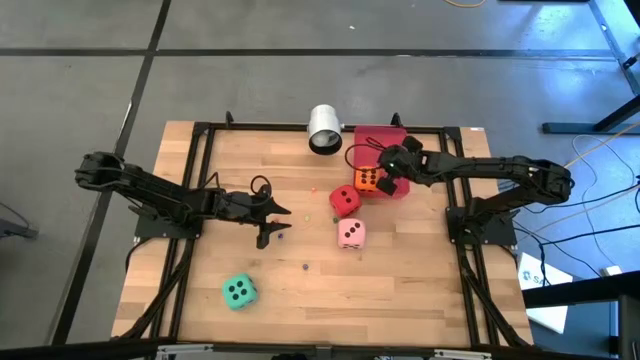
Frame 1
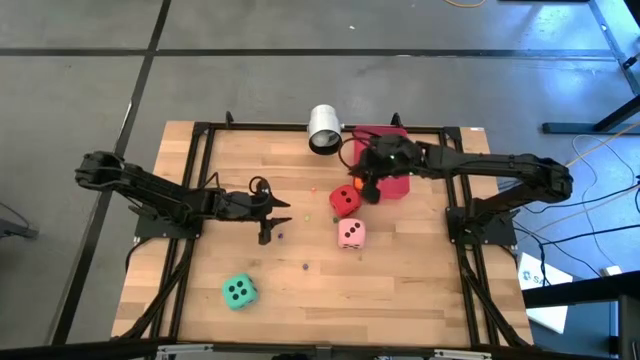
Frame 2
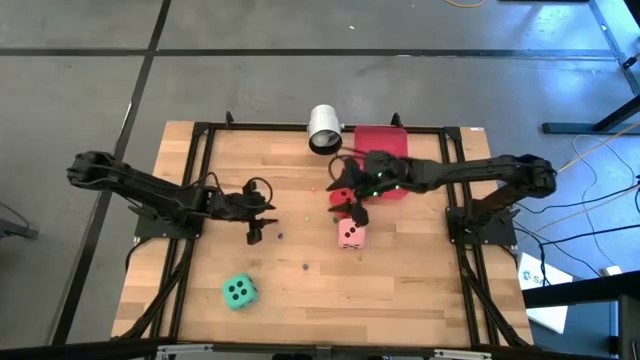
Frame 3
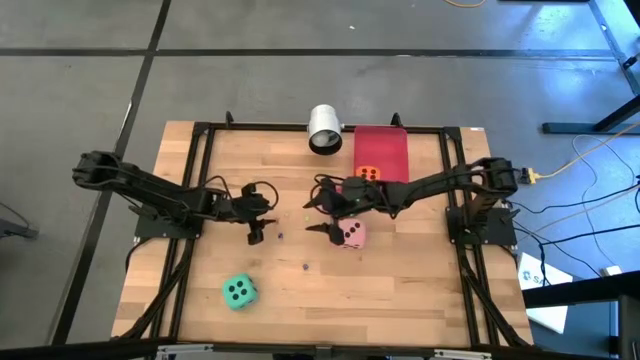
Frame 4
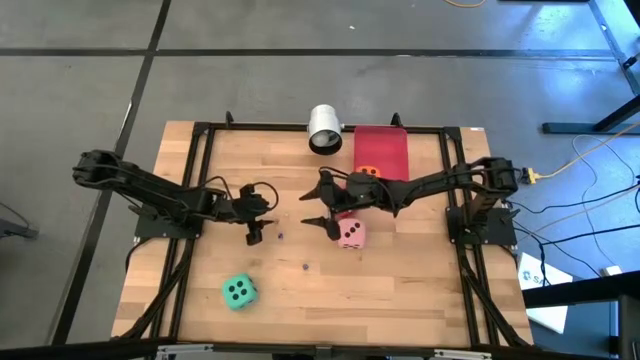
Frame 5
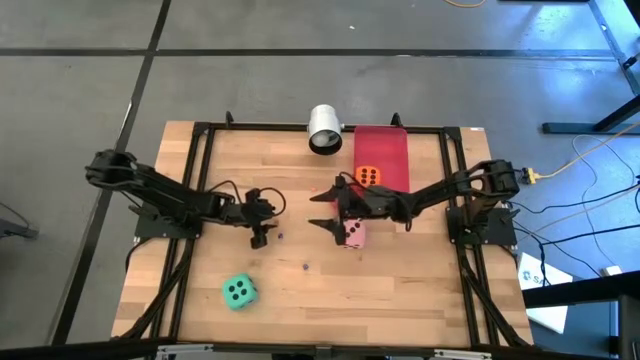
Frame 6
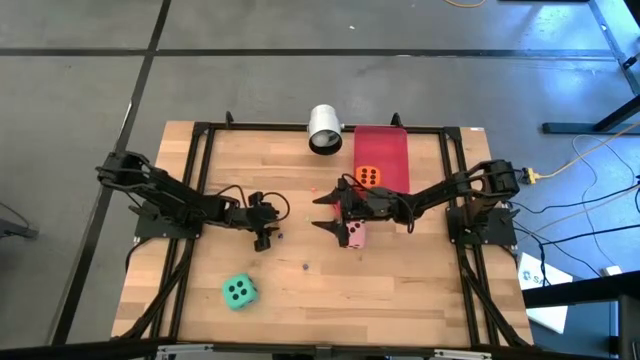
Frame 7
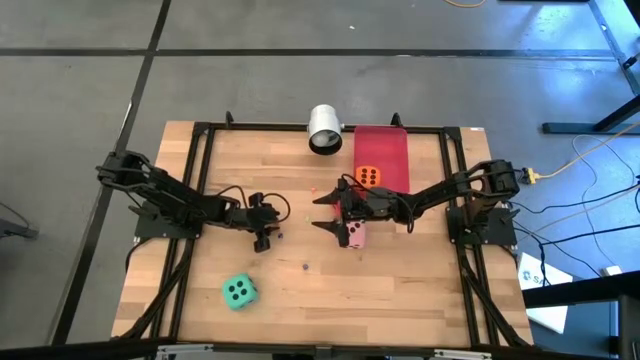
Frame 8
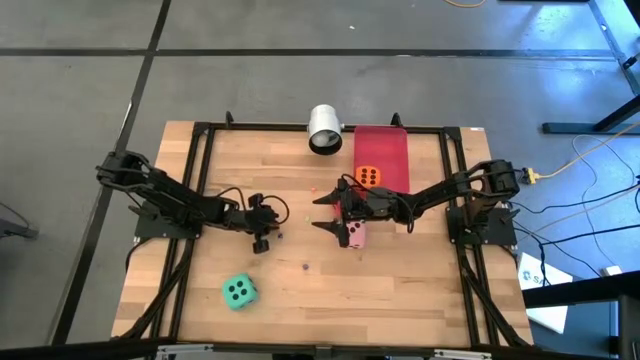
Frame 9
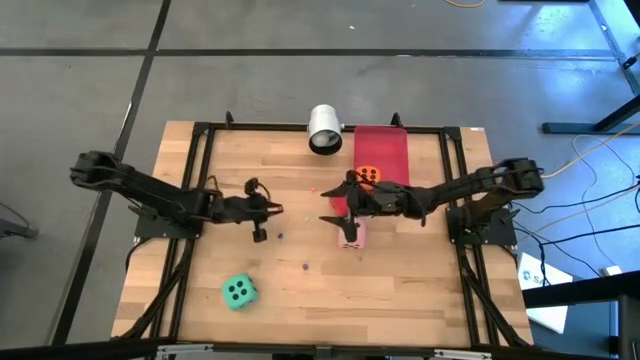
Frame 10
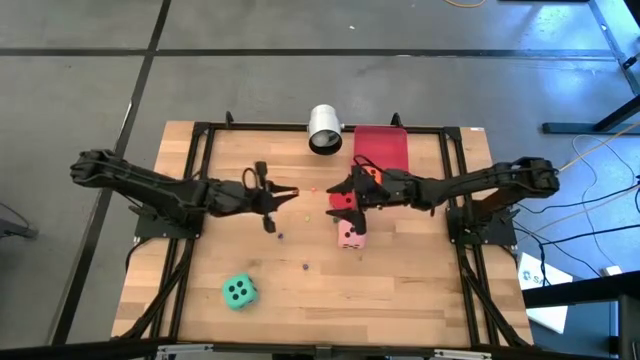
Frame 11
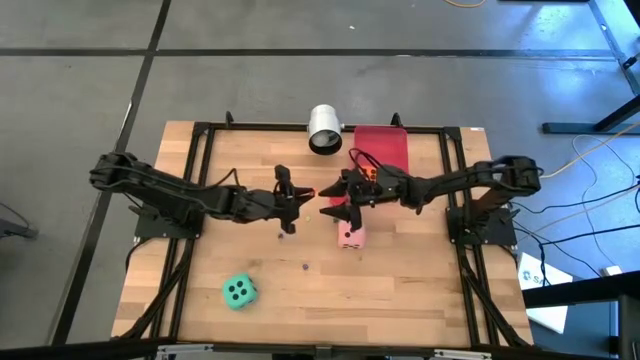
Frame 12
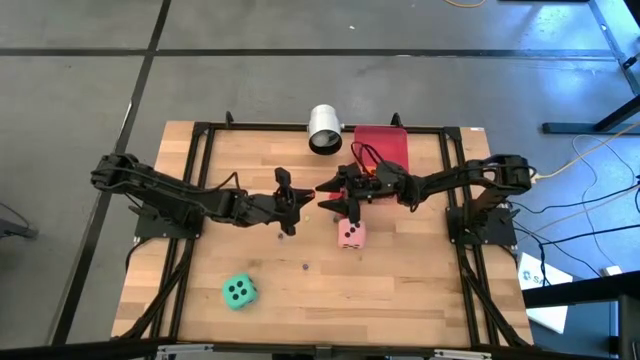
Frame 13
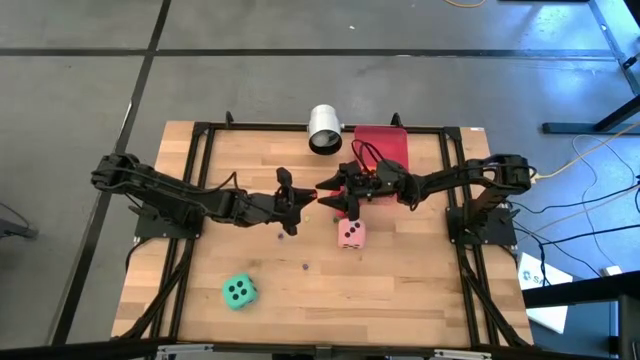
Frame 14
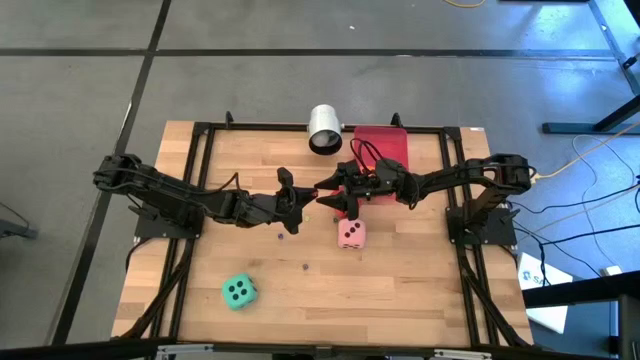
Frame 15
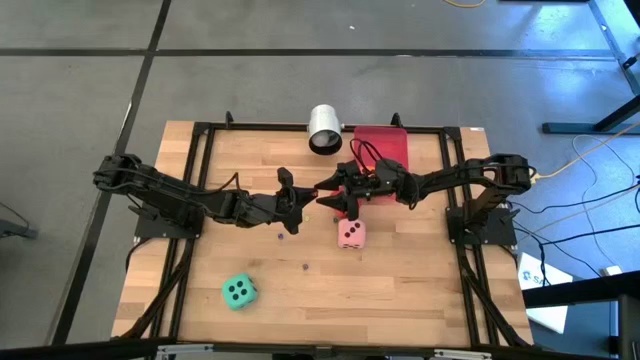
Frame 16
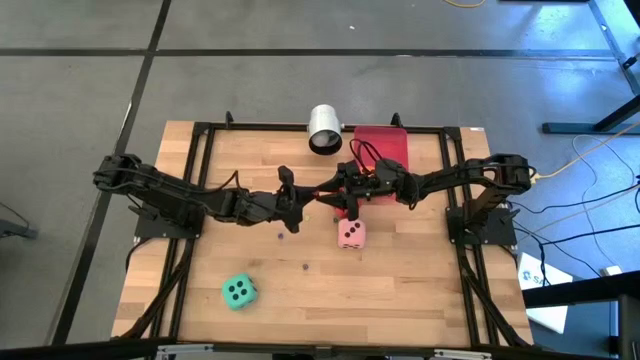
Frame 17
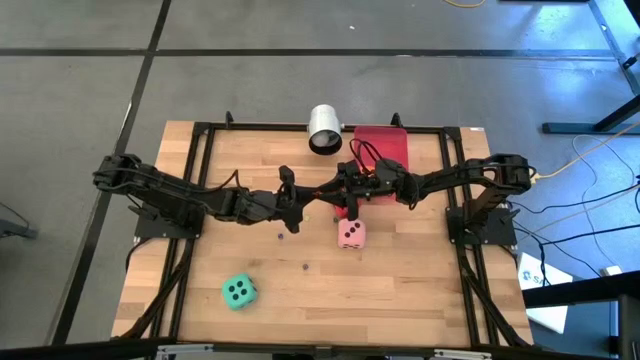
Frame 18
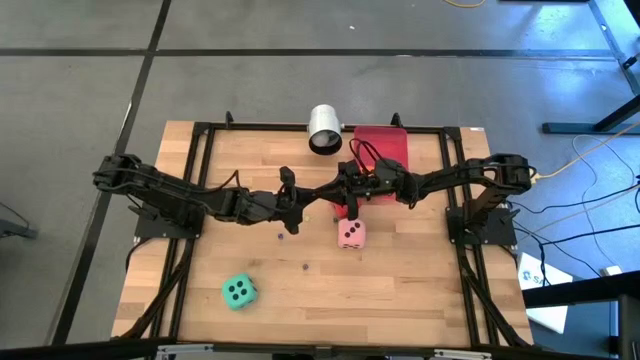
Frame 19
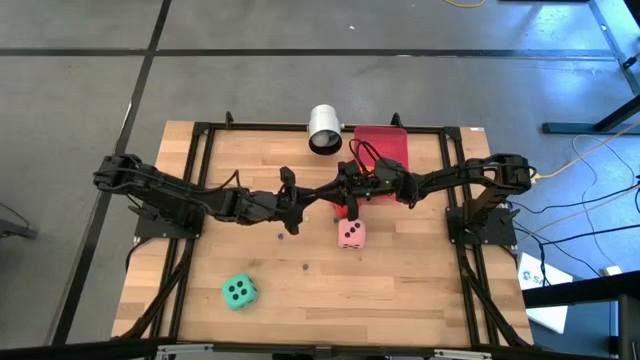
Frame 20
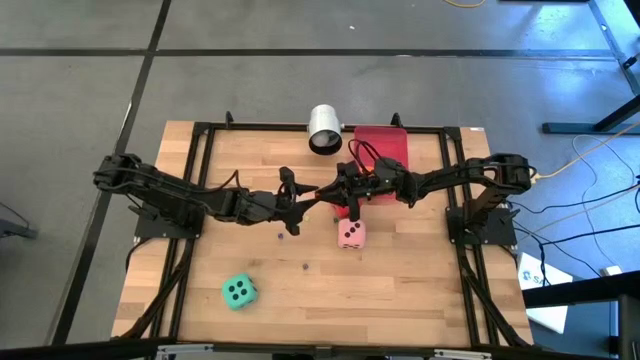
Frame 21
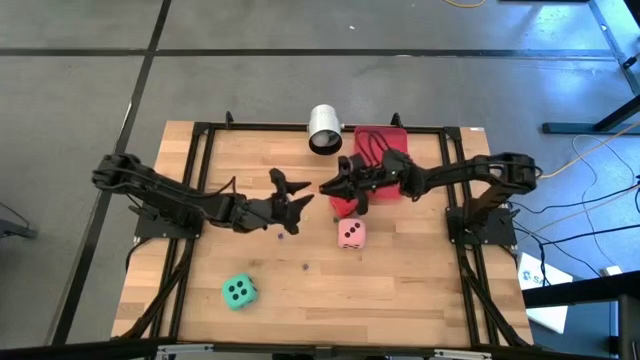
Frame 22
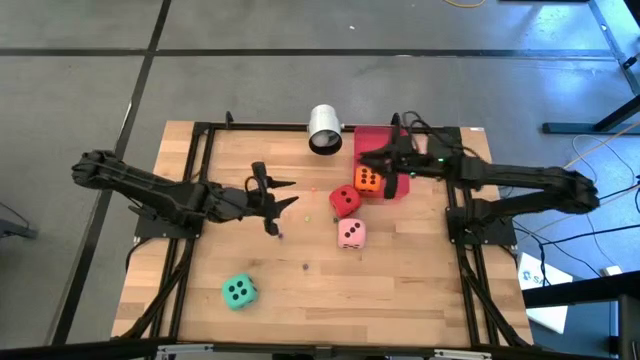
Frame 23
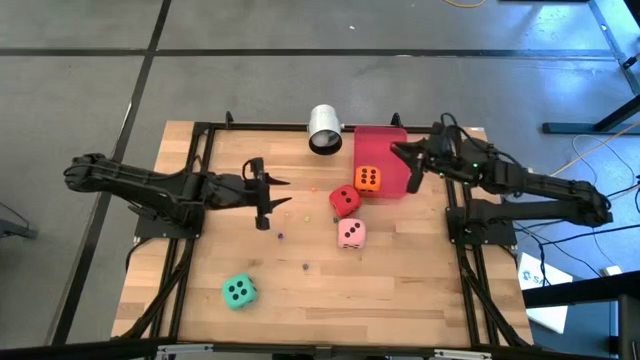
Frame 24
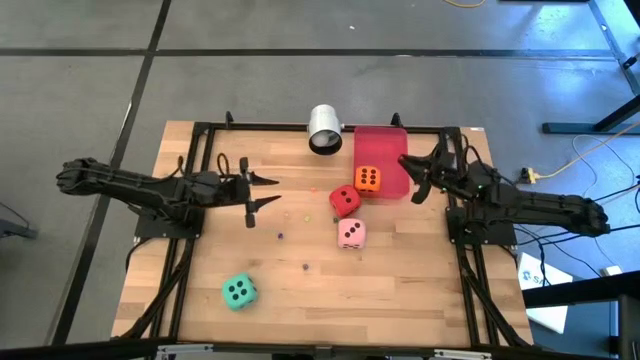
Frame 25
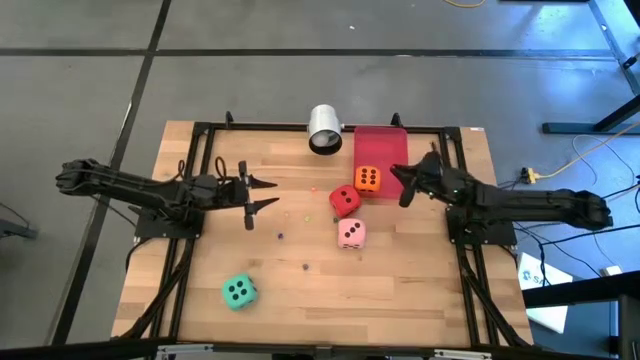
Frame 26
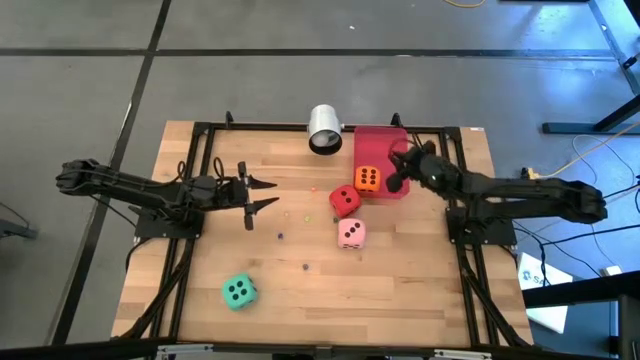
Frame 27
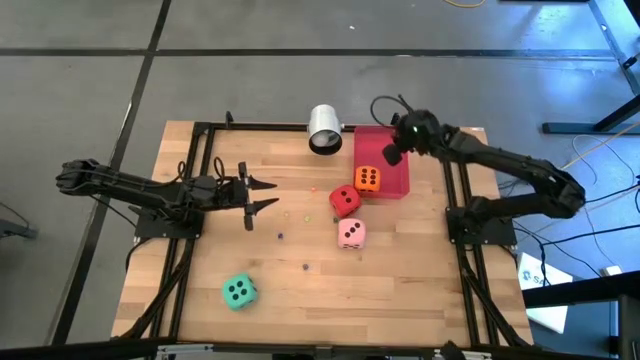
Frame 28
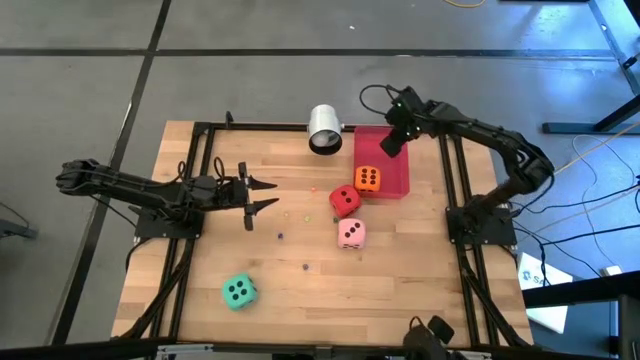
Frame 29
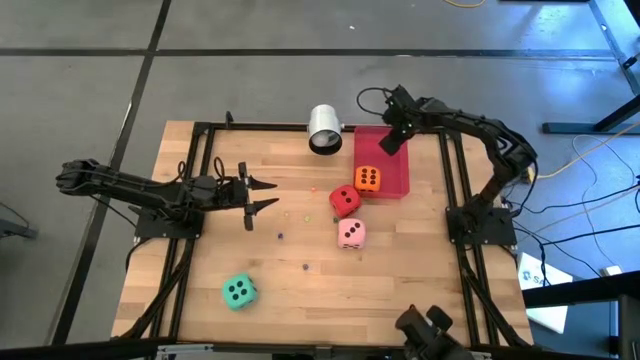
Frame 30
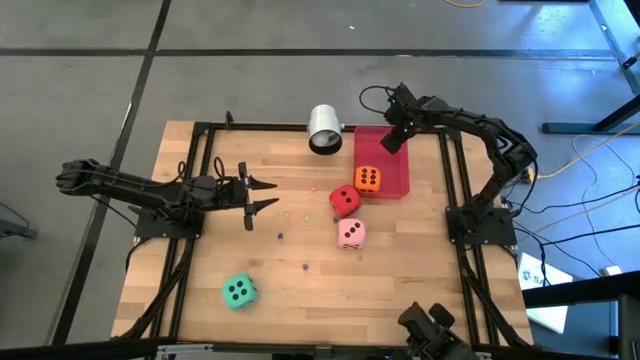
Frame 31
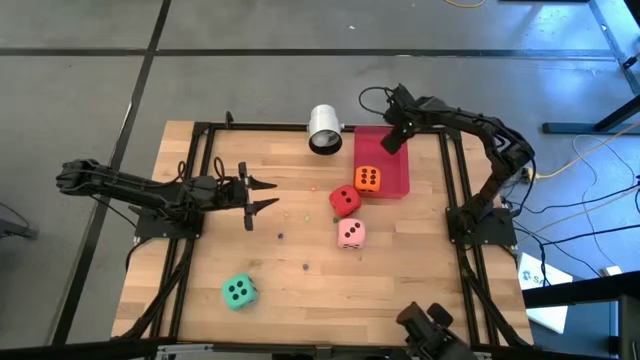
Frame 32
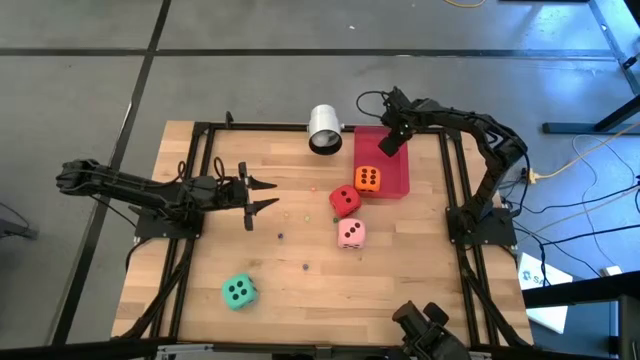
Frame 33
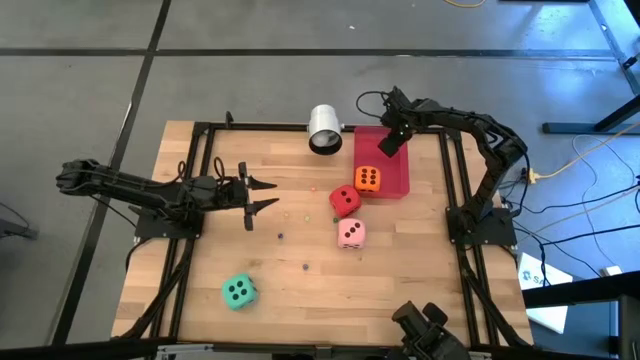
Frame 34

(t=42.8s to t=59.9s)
Task: Pick & Place Dice
Put the small red dice into the red bin

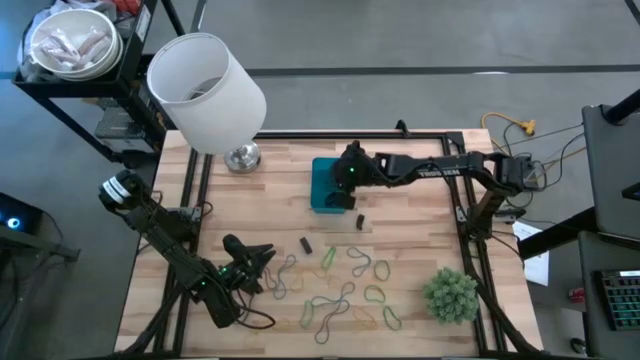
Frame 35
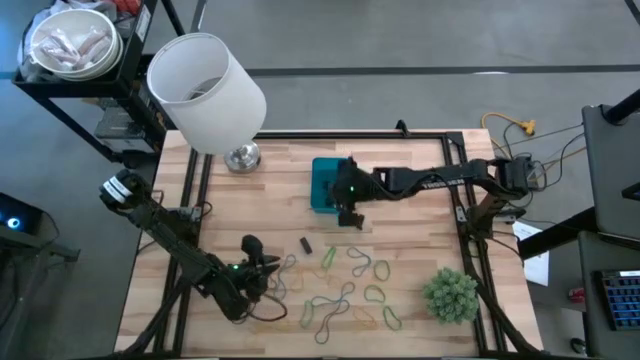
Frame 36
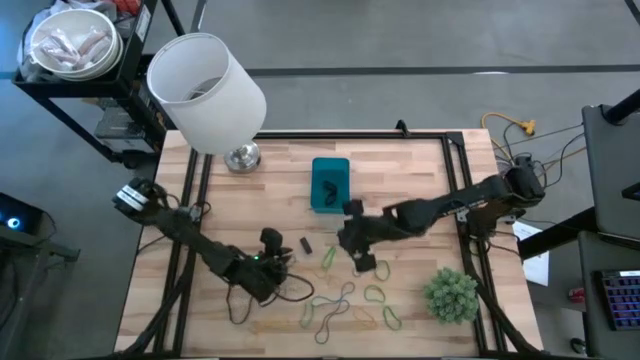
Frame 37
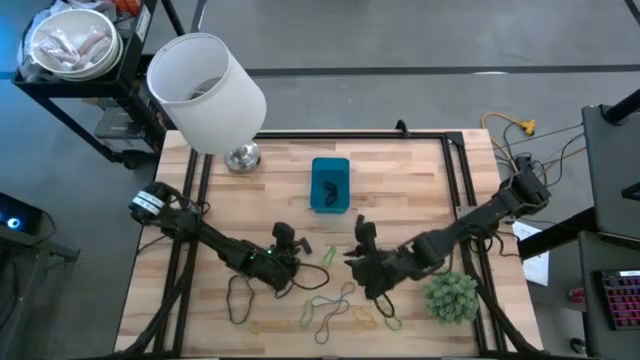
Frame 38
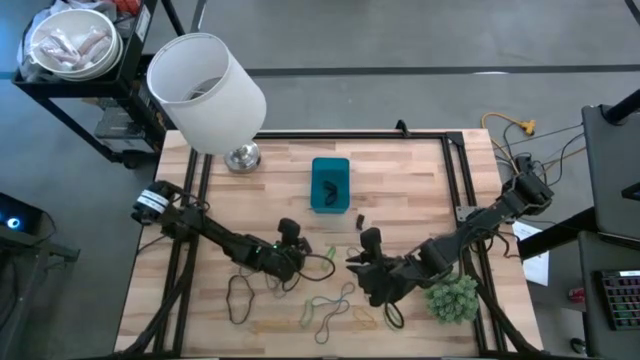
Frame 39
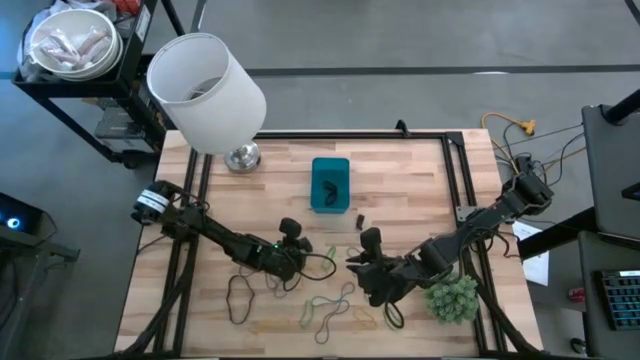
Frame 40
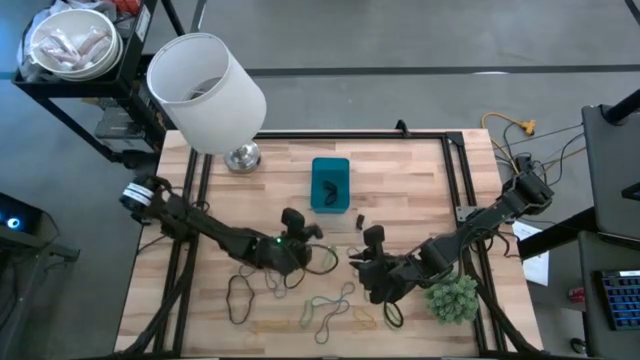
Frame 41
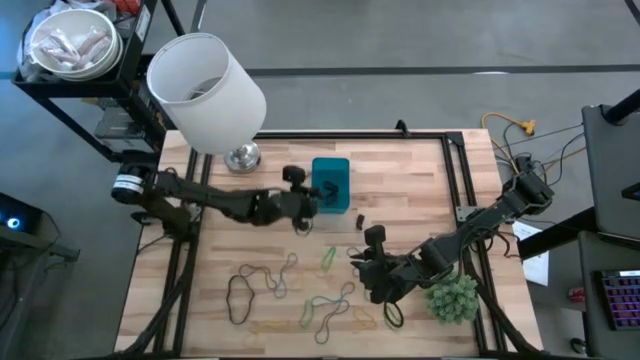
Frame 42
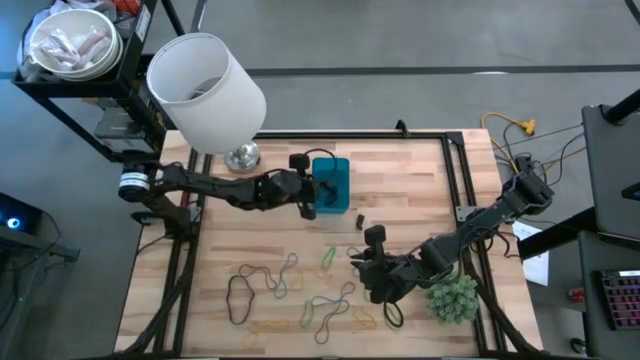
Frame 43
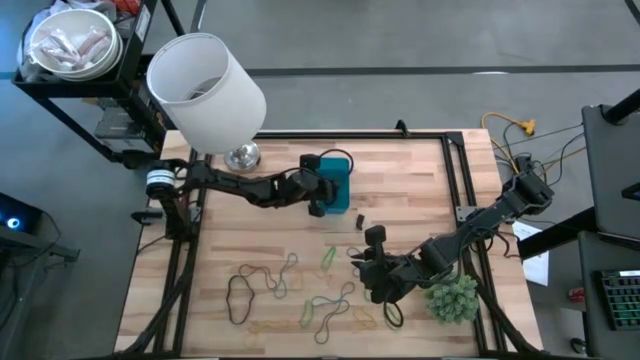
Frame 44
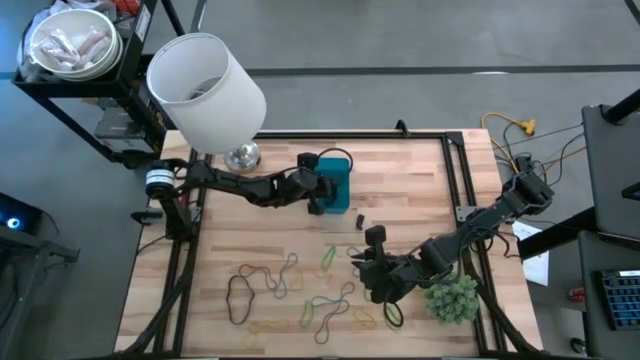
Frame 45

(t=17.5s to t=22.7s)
Task: Pick and place rubber bands into bin
Put the black rubber band into the blue bin
